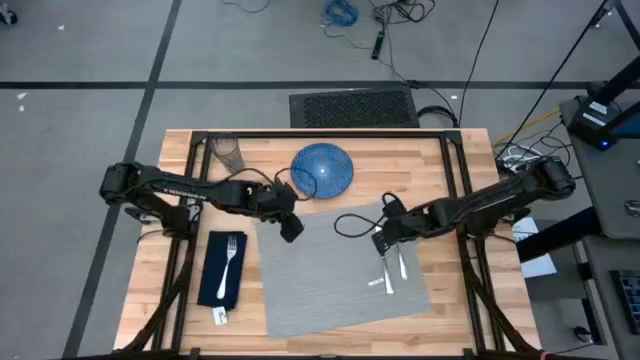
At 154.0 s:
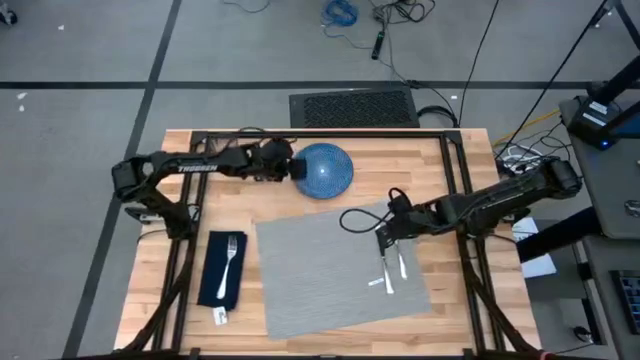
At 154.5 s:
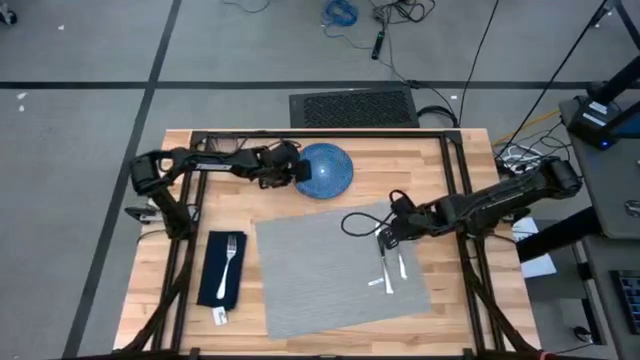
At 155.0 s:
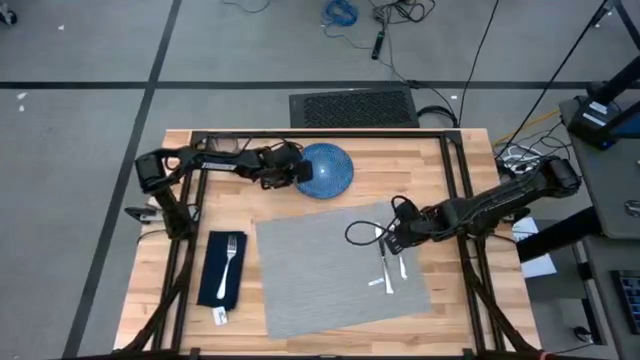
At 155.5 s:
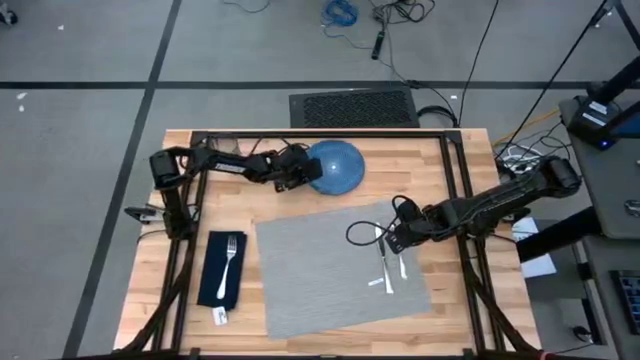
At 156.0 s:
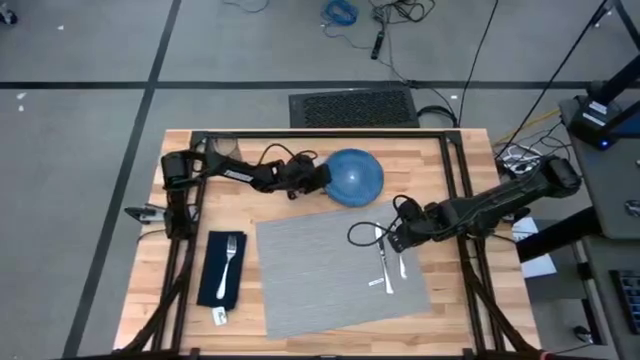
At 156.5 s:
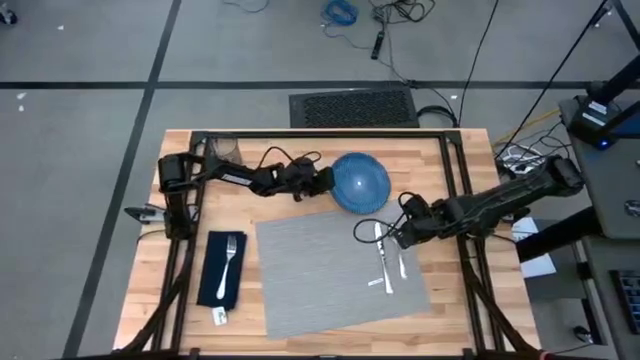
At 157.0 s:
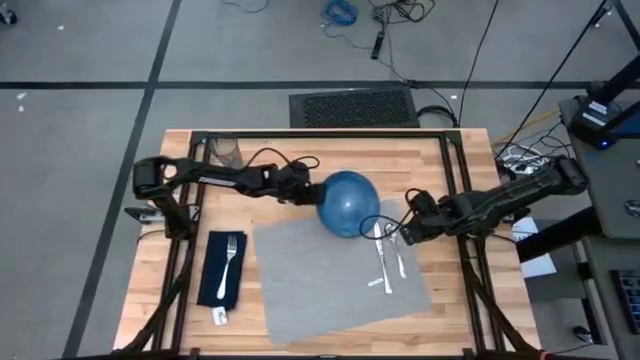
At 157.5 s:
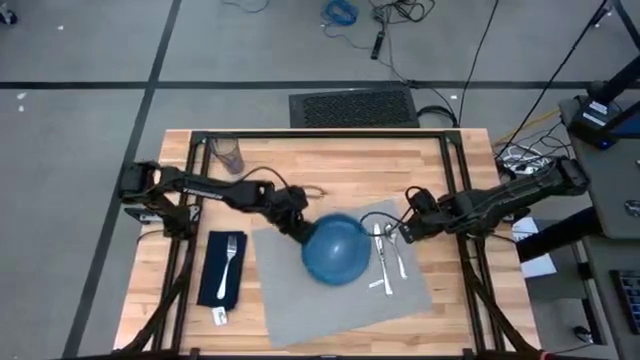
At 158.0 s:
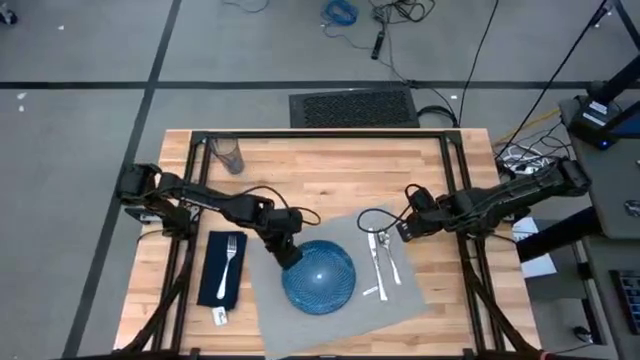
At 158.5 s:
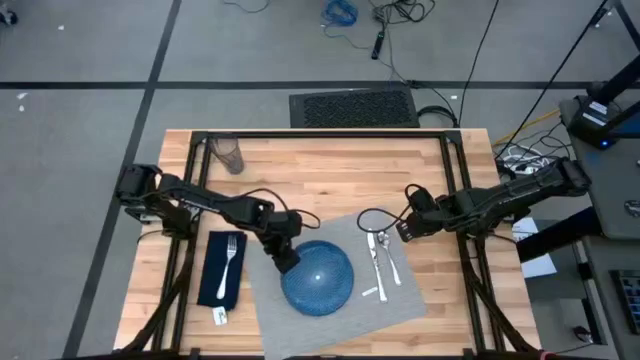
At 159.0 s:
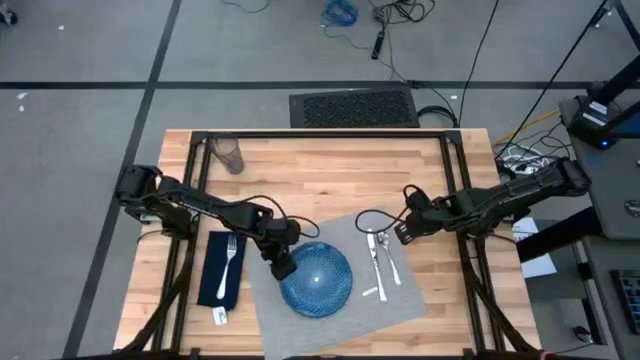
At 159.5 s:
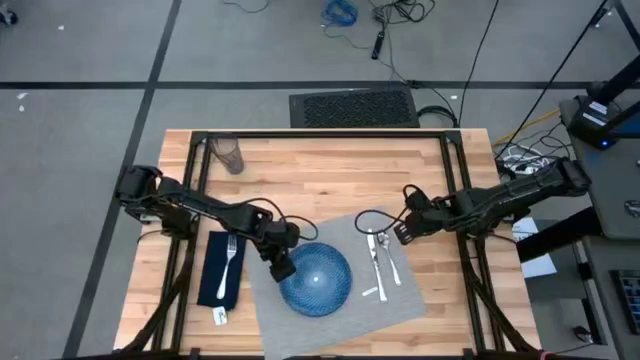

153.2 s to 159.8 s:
Task: Set table place
Put the blue plate on the gray placemat

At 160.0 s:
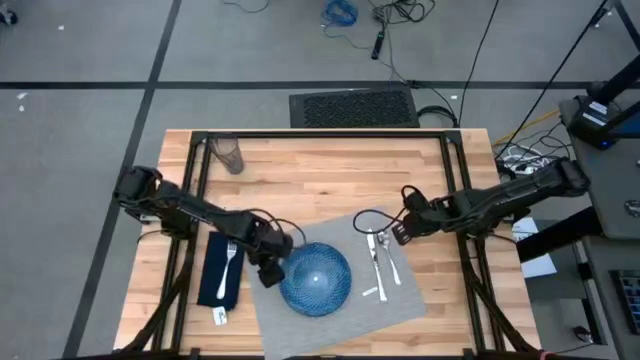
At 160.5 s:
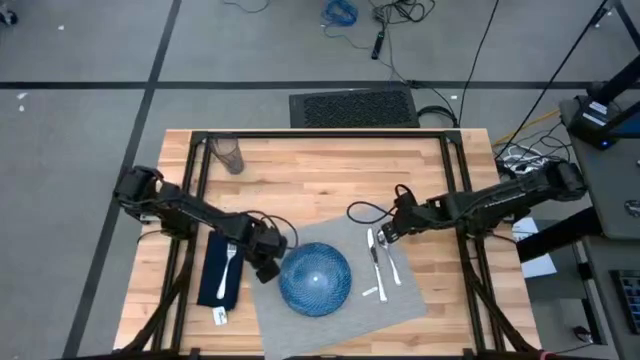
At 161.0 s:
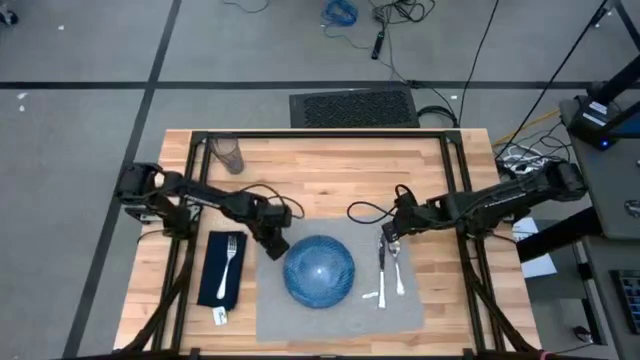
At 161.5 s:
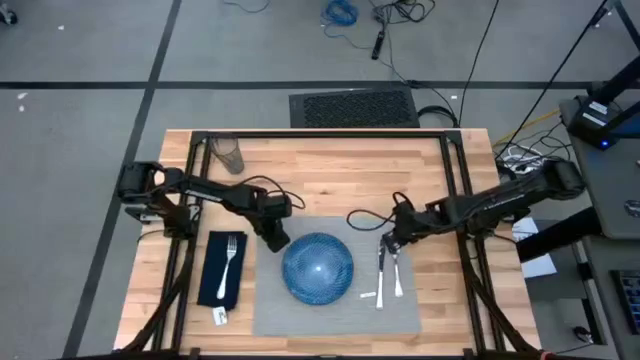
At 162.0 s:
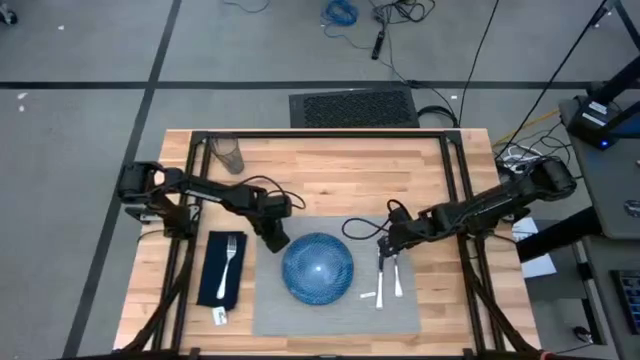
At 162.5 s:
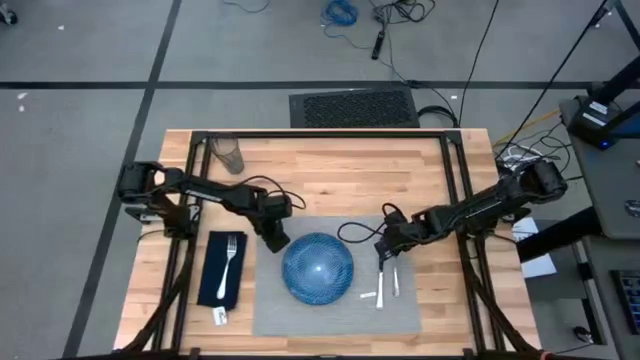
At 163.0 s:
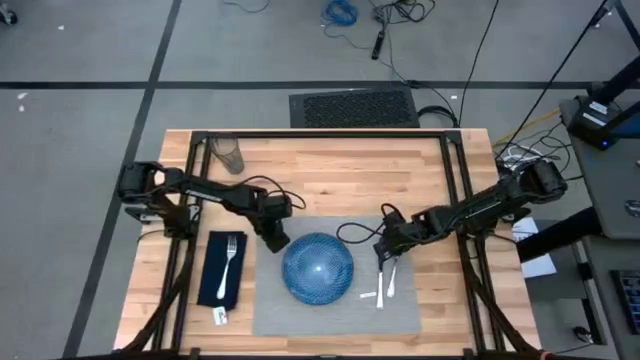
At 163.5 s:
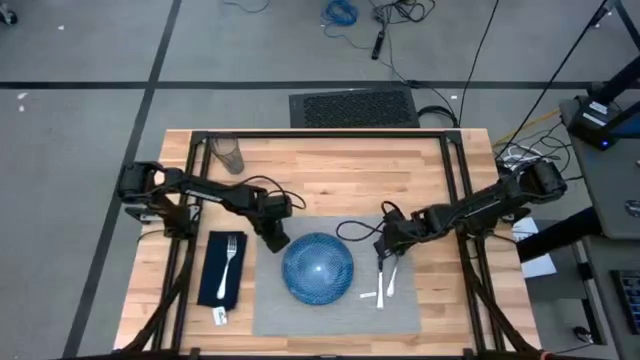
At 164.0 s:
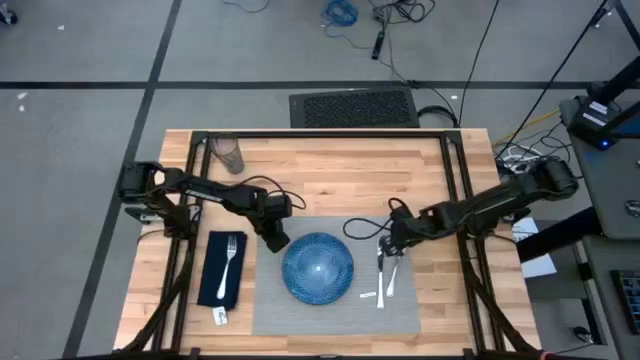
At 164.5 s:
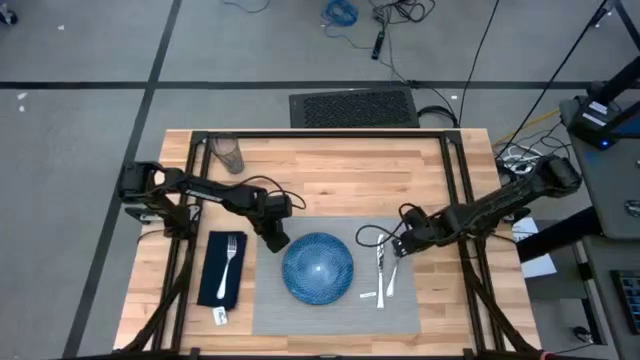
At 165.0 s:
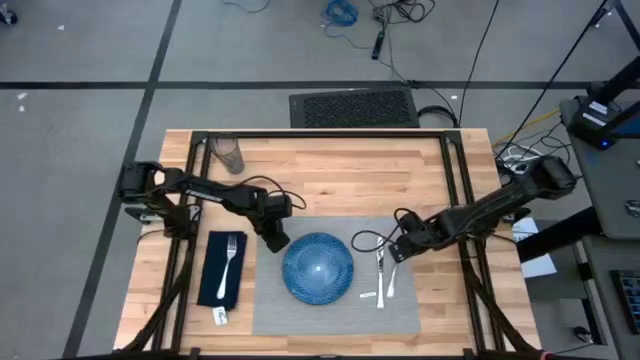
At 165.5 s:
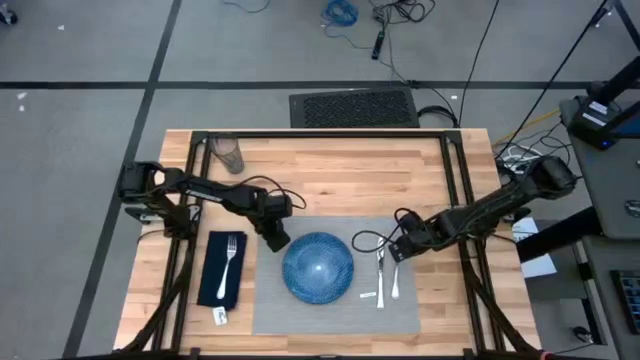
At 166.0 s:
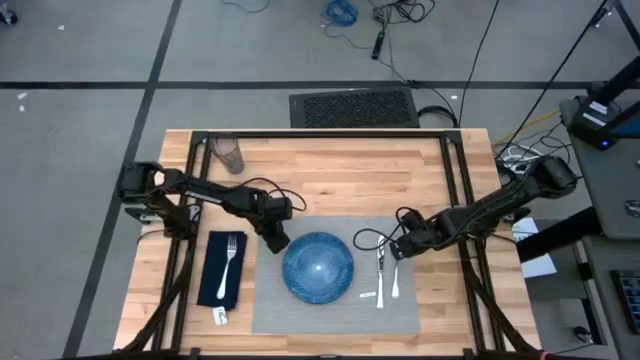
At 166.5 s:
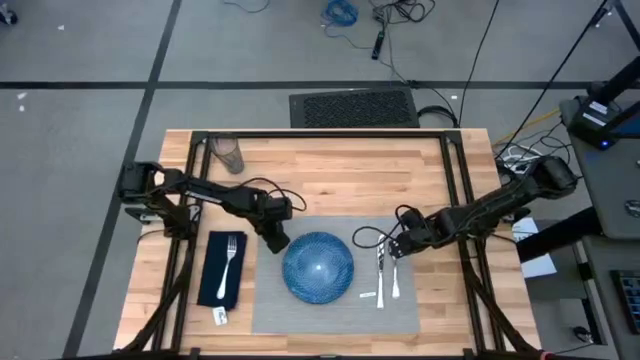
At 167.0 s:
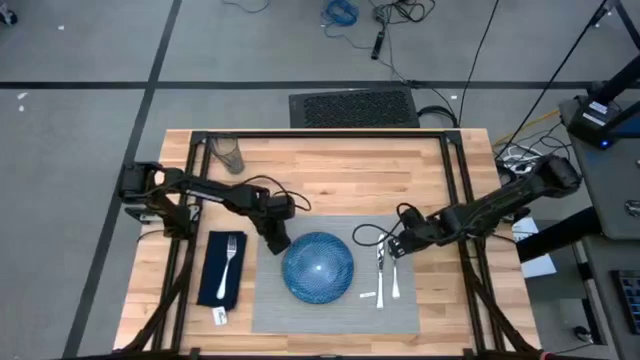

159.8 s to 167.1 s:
Adjust the table place

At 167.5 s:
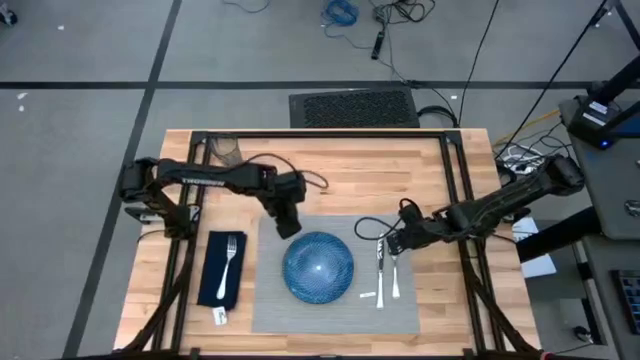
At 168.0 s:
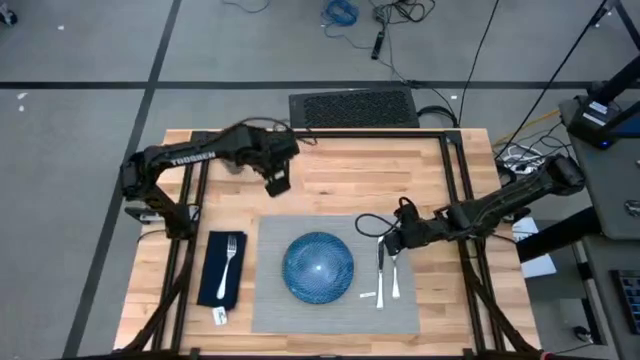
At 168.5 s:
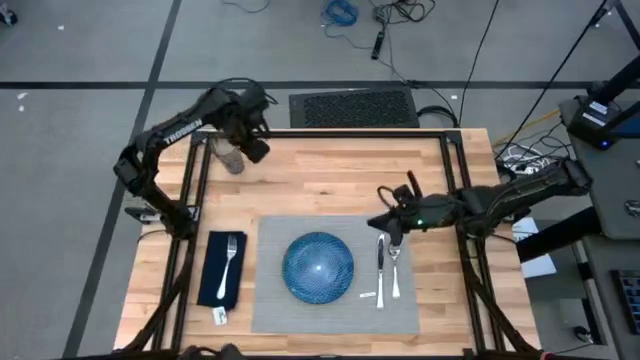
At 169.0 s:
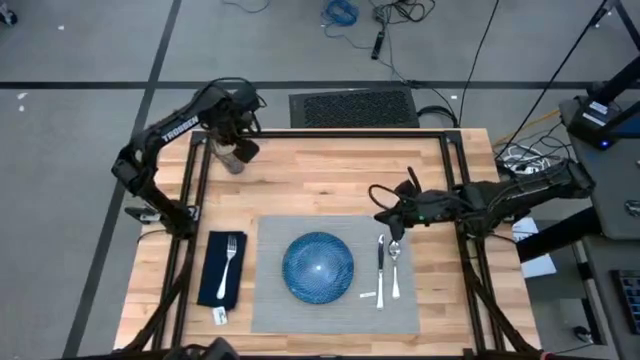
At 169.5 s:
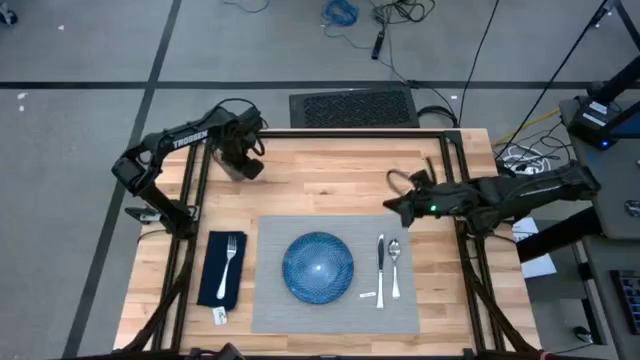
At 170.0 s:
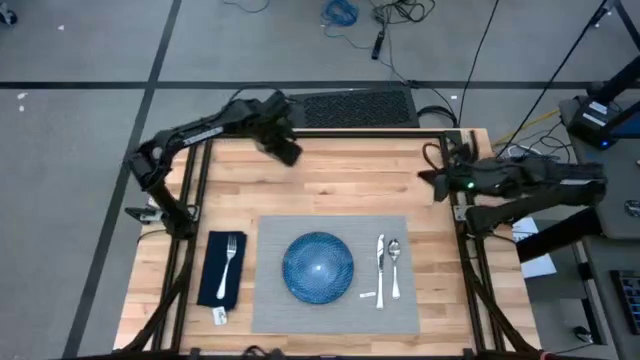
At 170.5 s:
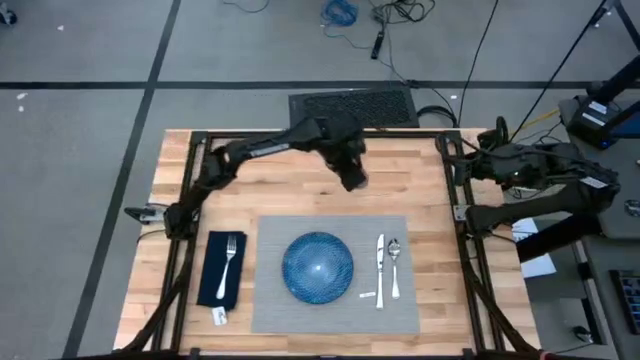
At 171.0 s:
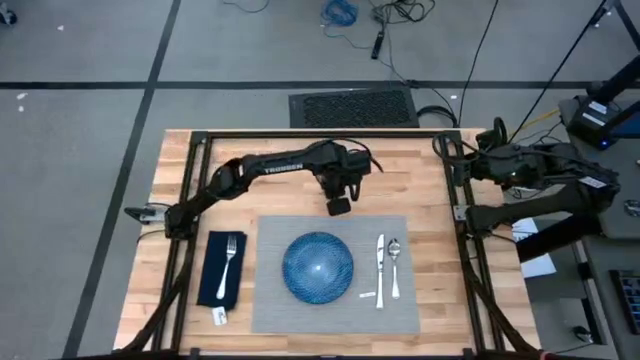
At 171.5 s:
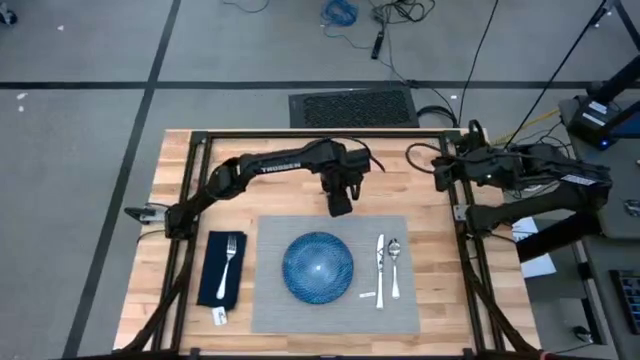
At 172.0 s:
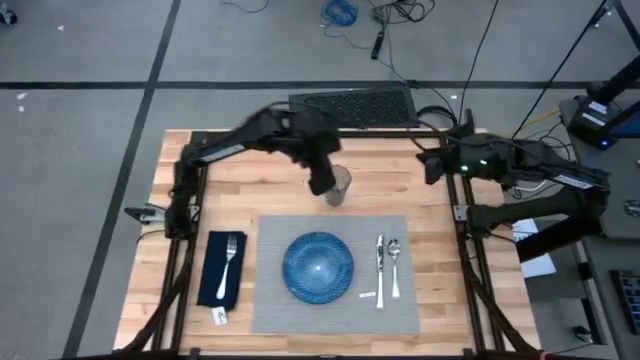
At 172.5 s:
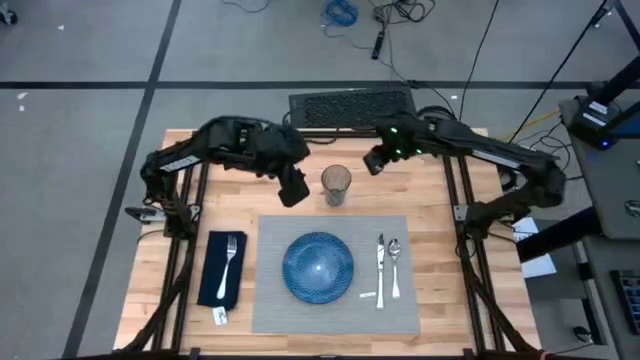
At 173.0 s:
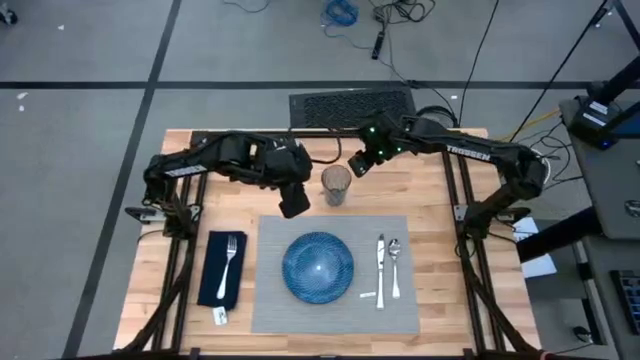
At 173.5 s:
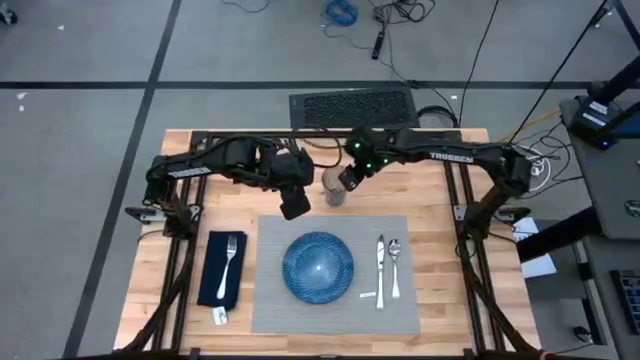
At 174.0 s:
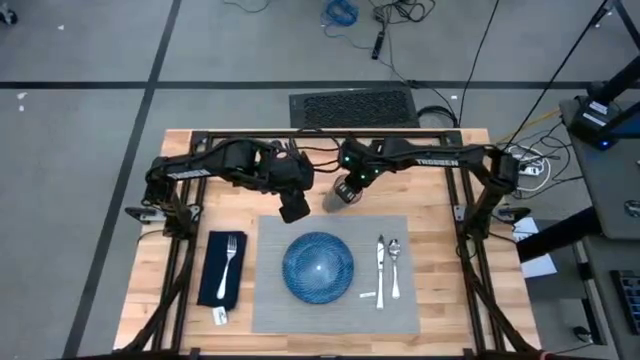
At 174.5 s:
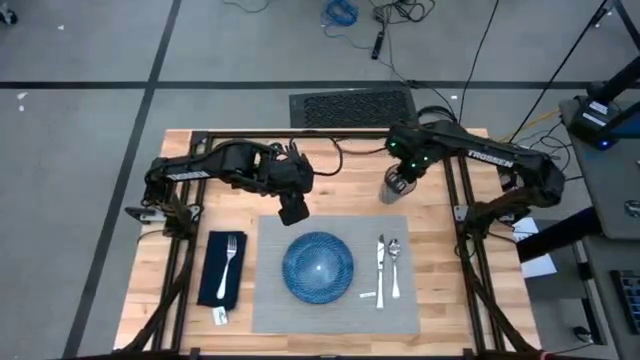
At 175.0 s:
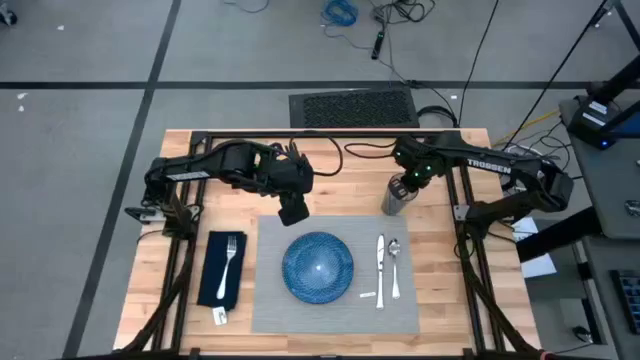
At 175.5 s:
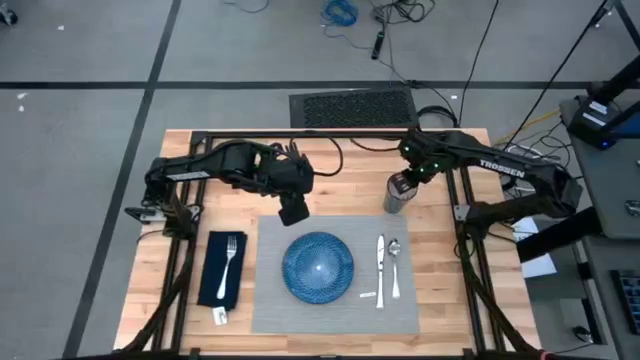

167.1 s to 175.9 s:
Move the blue cup to the top right of the gray placemat
